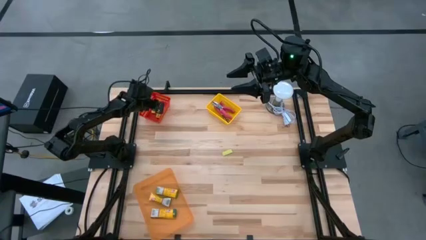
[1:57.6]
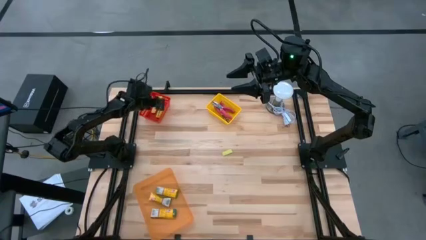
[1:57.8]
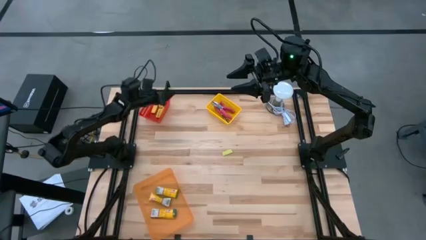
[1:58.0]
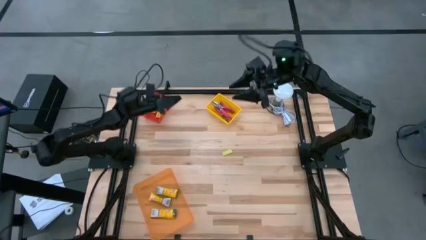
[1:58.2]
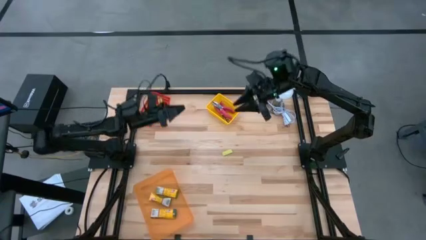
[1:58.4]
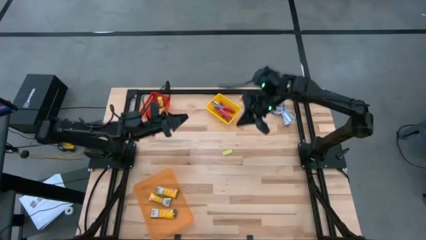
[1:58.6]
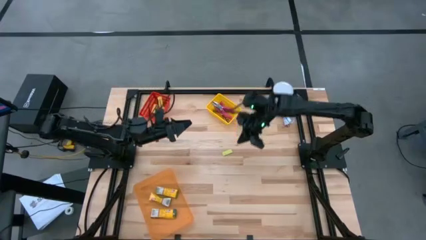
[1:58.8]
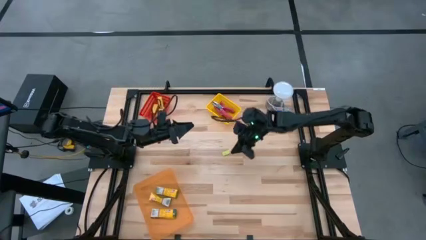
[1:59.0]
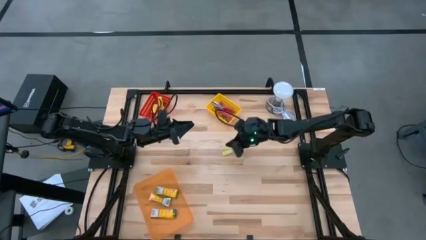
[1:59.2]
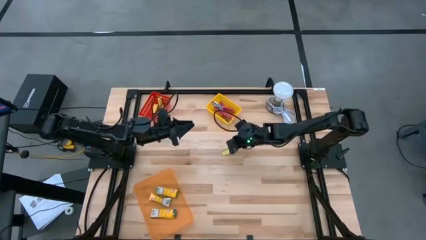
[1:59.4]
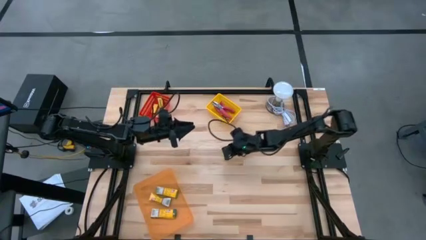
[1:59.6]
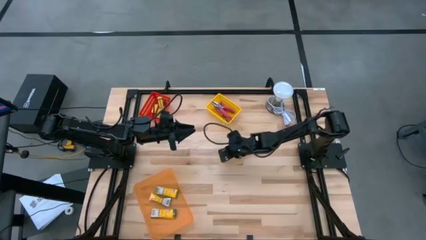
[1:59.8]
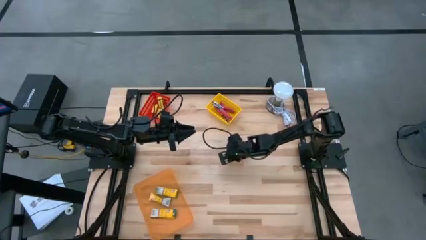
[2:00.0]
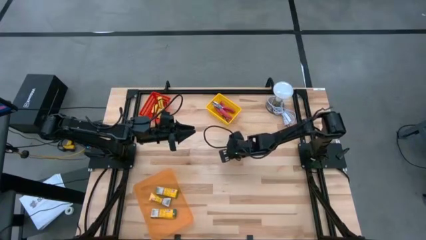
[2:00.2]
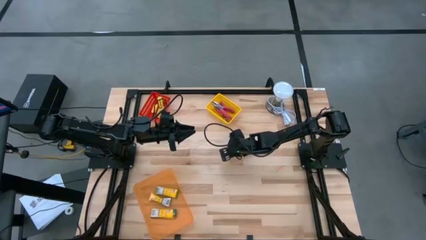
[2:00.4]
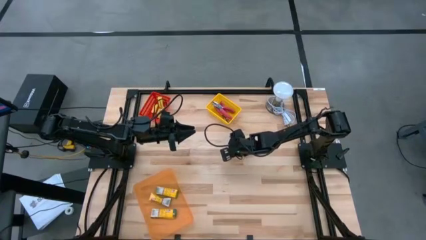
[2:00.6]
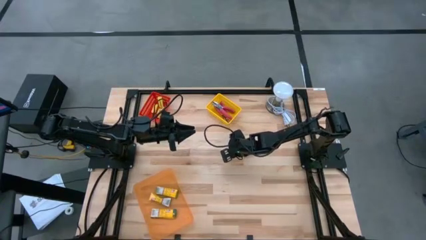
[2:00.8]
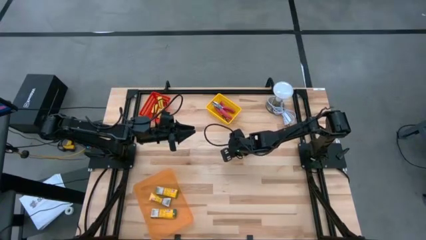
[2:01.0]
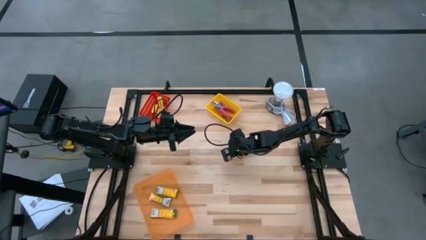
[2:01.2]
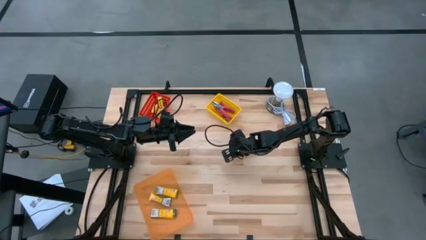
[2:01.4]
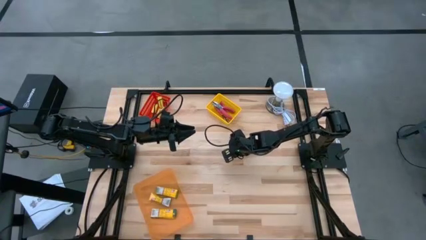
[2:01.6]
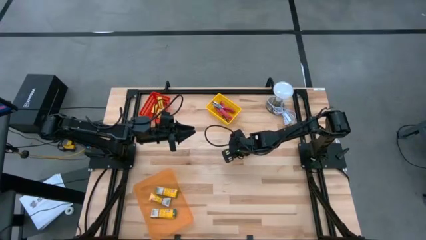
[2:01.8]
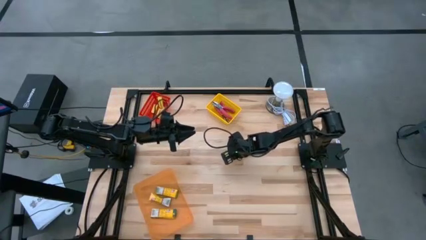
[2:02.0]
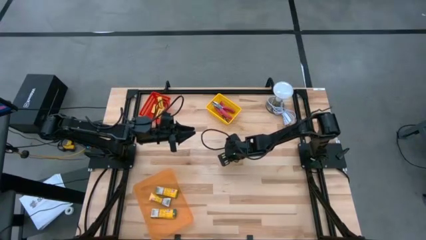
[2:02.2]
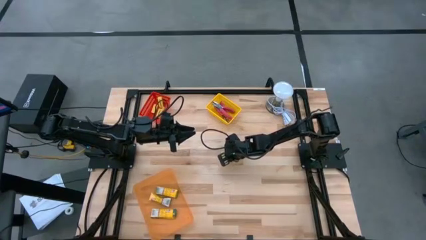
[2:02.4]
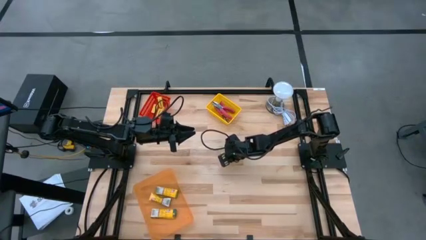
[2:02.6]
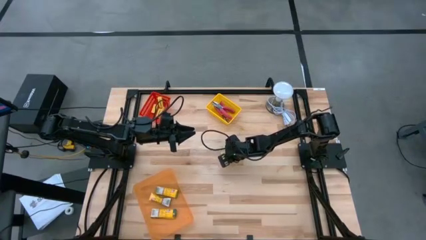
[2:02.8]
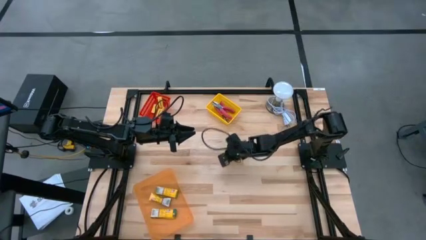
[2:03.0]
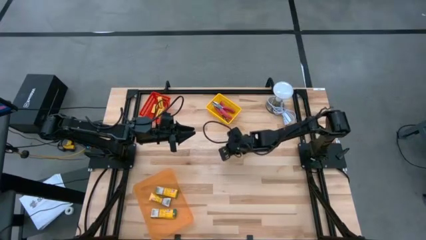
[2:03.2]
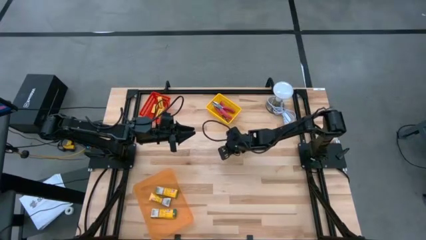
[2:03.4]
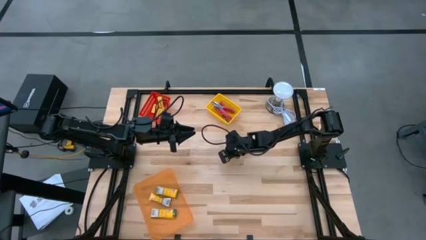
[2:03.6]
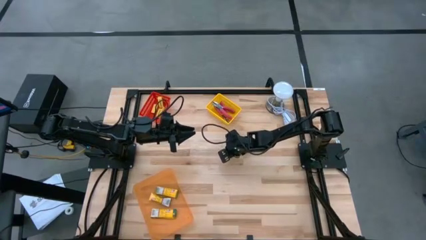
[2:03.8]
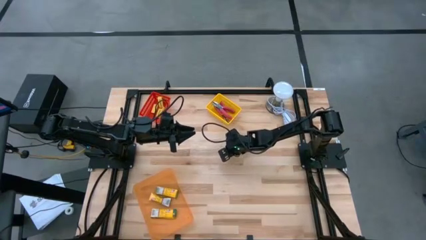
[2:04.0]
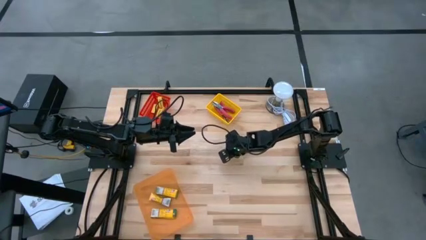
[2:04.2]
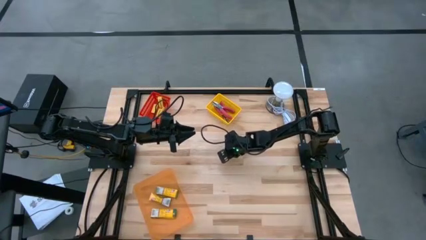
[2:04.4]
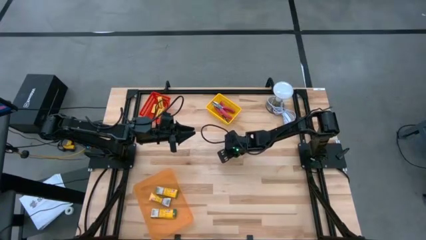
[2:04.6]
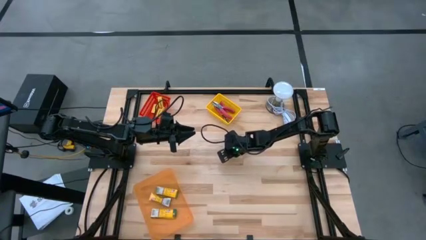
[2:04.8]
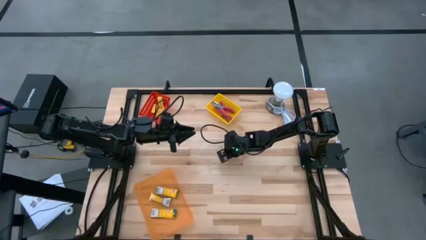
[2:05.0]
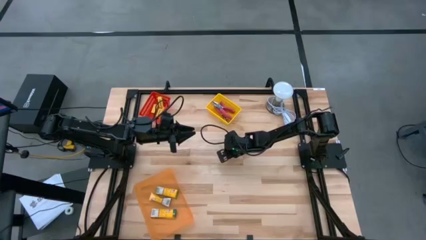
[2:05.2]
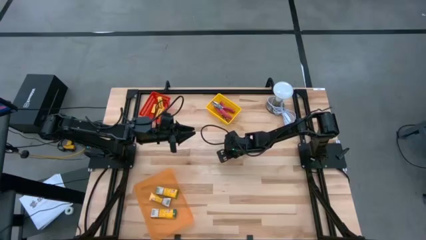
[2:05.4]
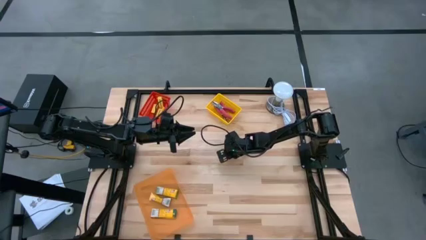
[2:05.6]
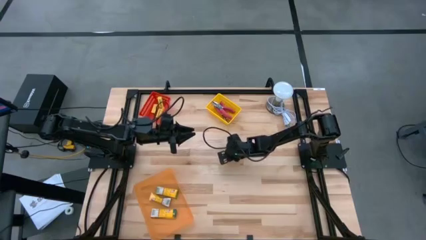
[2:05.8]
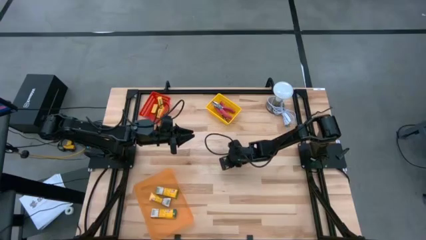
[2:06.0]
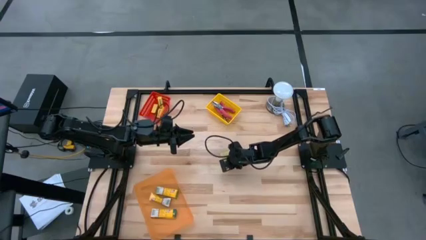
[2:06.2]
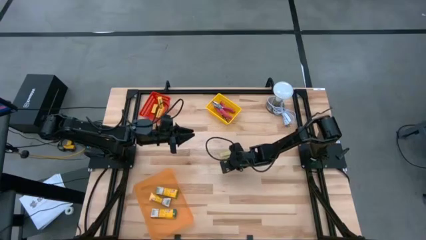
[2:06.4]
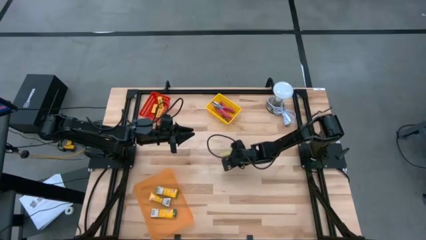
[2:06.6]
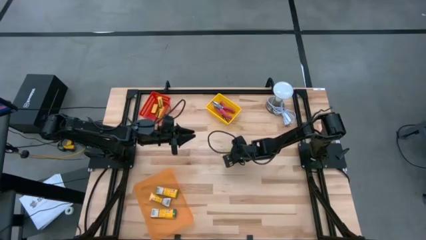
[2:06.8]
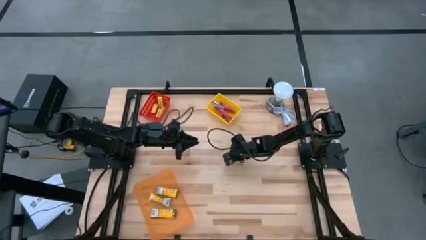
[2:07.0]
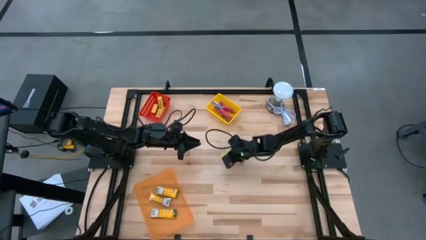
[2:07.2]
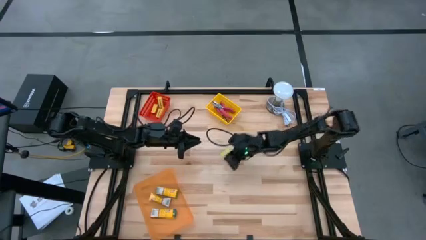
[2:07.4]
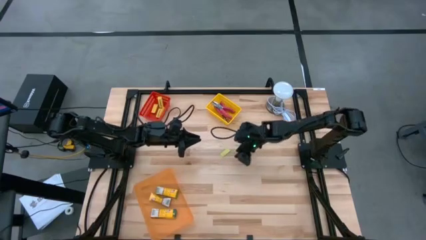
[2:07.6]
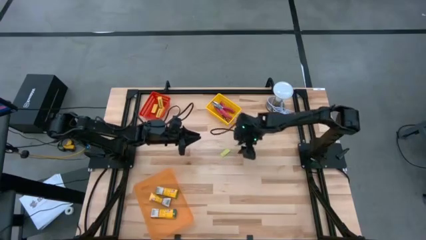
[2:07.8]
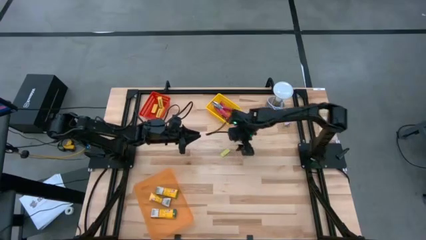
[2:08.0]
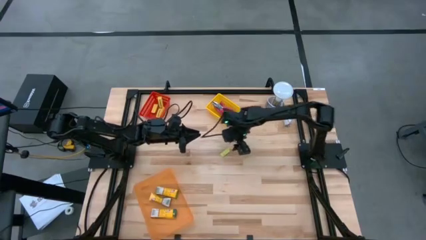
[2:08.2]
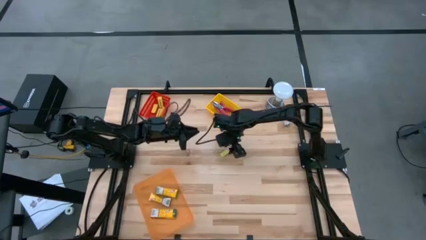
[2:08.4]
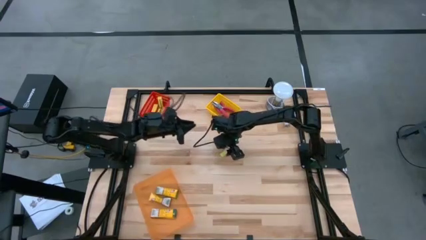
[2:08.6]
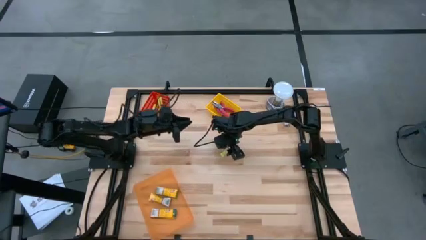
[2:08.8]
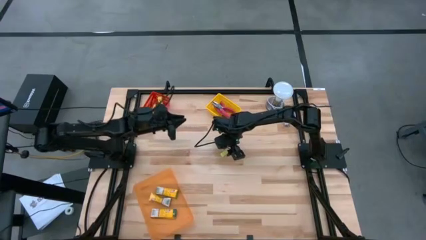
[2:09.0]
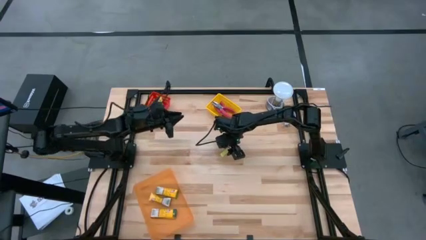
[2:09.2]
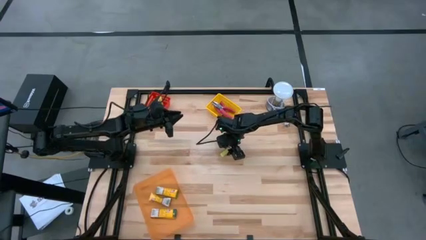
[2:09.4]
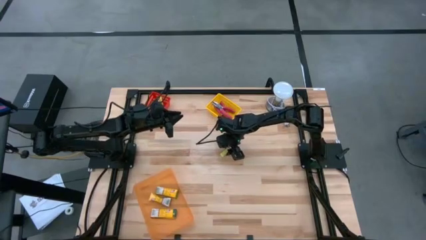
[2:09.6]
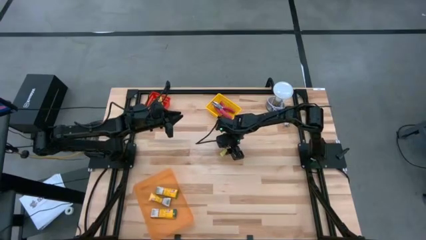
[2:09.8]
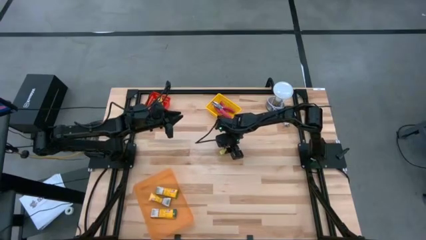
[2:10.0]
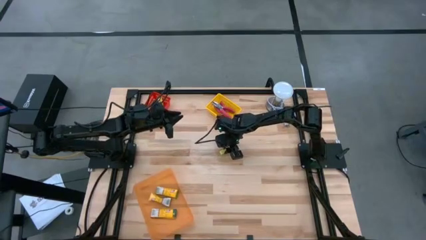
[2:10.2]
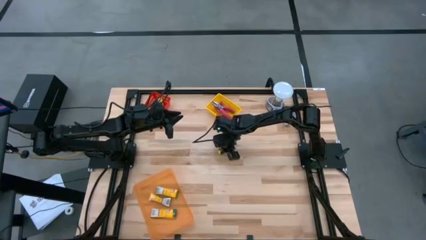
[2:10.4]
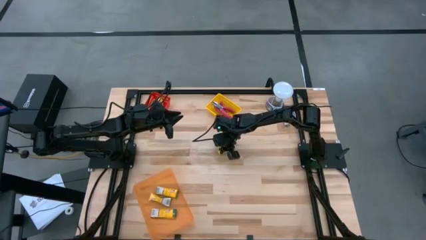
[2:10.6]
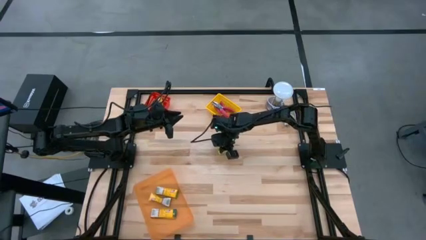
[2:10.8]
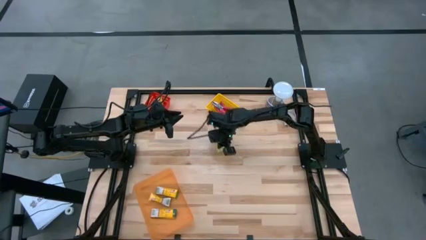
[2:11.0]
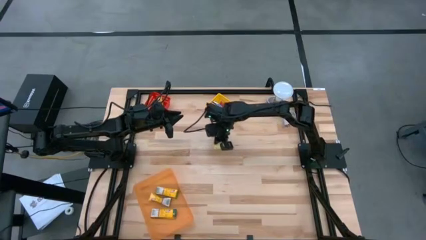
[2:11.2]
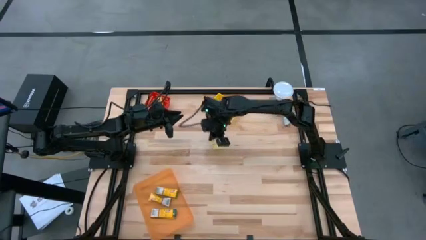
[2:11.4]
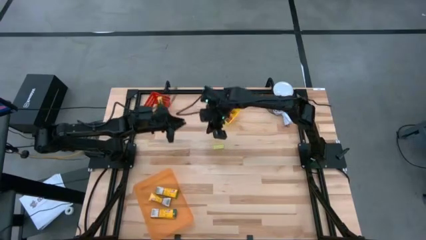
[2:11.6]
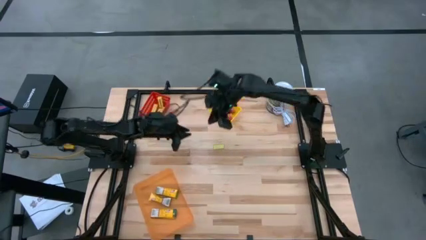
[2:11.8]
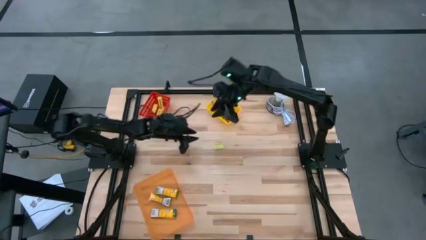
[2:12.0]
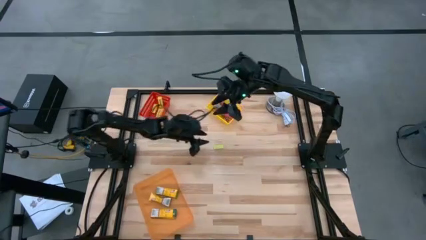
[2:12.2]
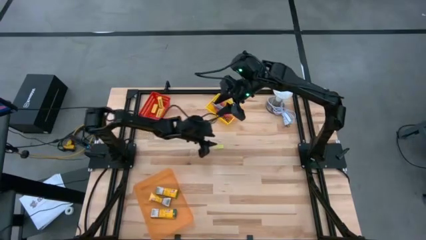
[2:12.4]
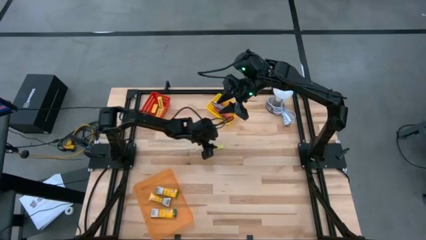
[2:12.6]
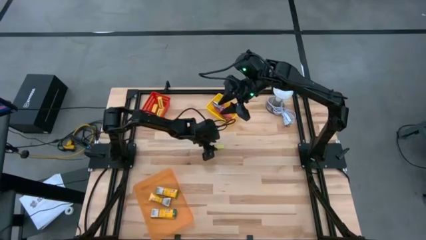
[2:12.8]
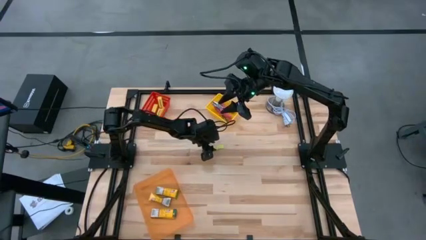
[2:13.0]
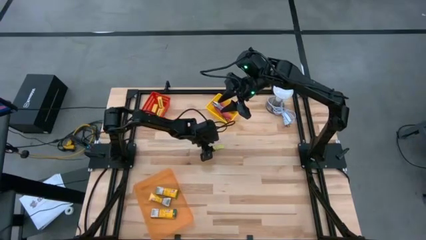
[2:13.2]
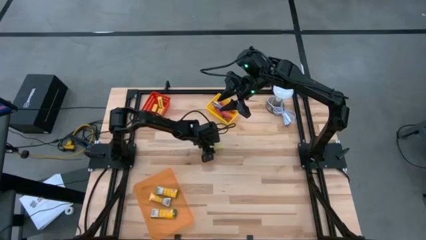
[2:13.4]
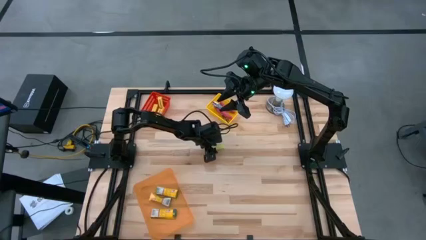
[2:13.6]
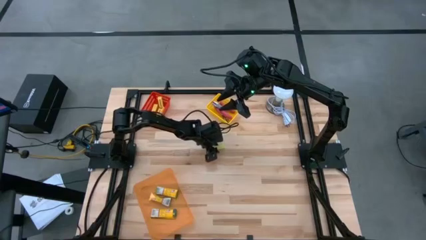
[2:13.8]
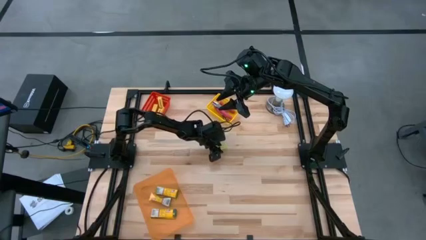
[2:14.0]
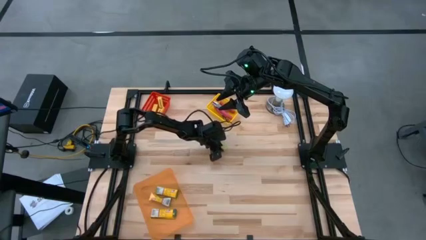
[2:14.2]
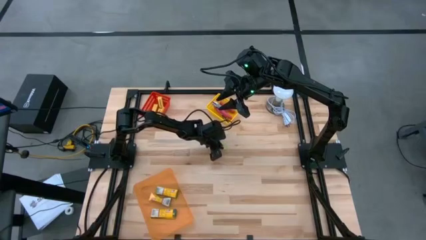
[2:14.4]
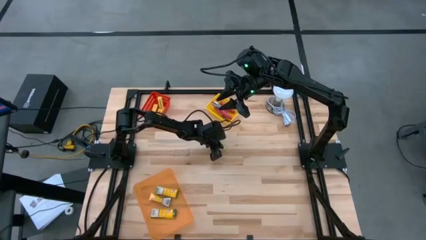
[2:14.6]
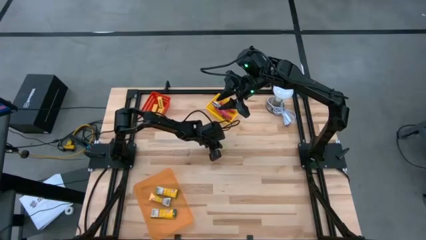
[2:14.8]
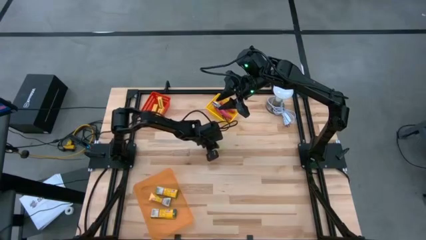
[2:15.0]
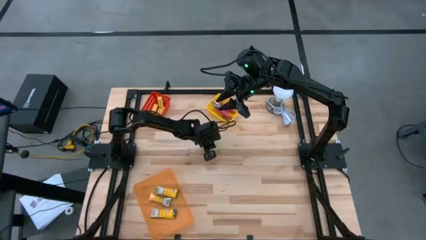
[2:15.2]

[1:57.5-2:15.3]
Task: Pick & Place School Supplies
Put the light green eraser into the red bin
